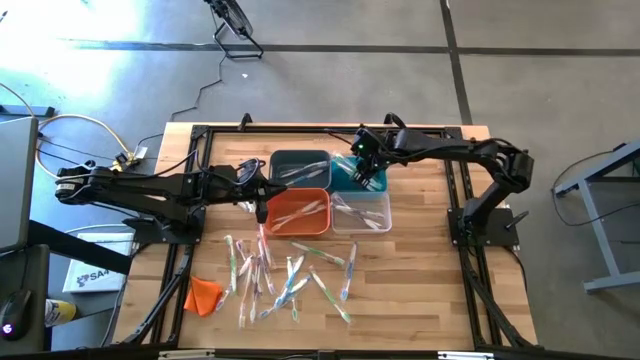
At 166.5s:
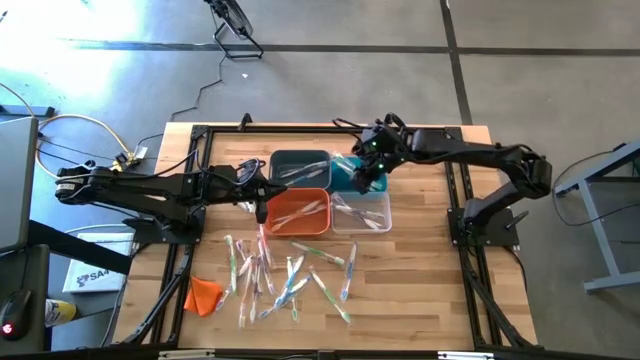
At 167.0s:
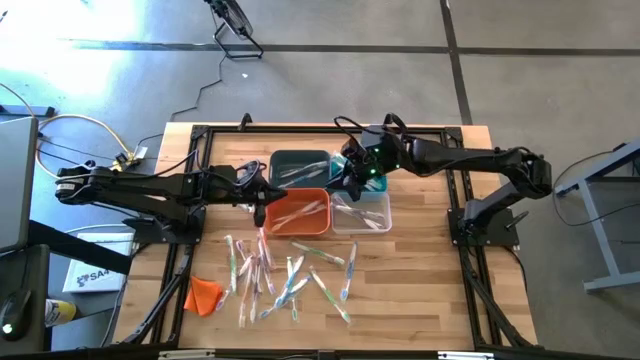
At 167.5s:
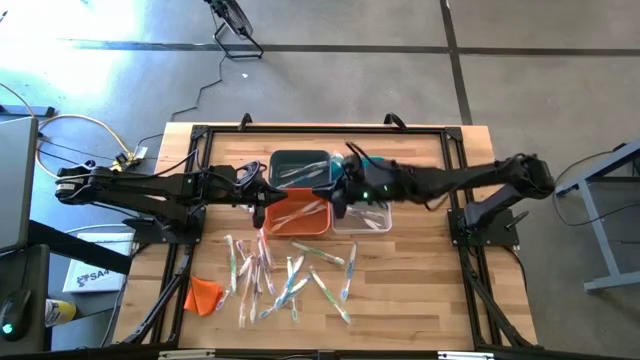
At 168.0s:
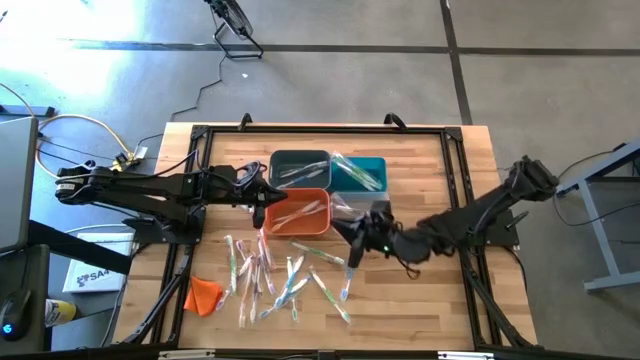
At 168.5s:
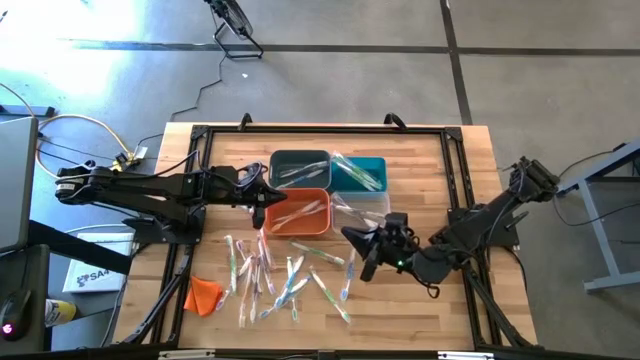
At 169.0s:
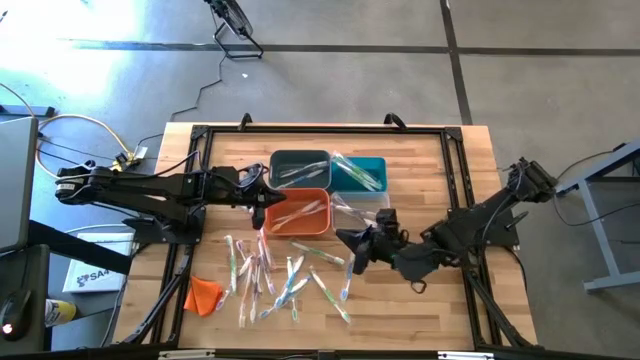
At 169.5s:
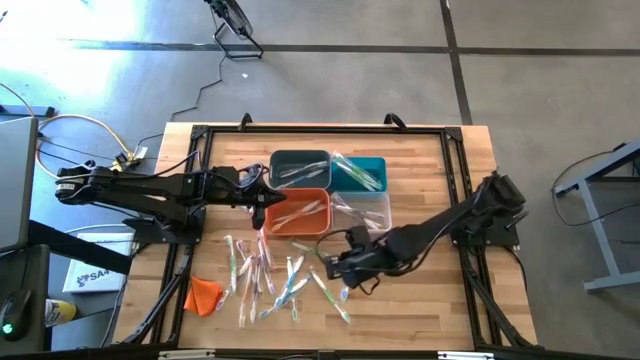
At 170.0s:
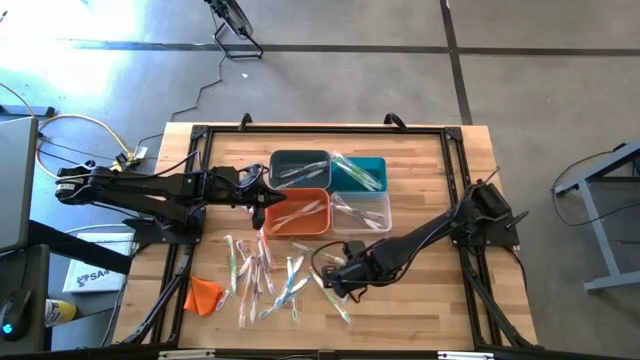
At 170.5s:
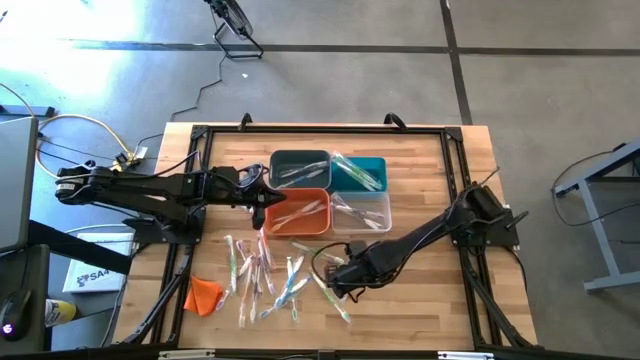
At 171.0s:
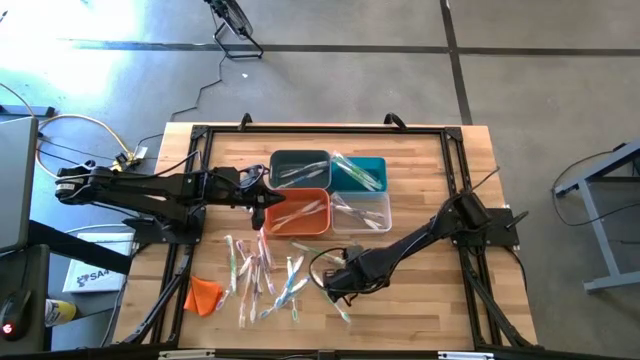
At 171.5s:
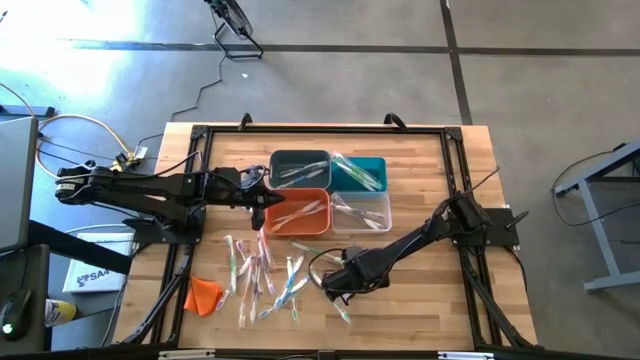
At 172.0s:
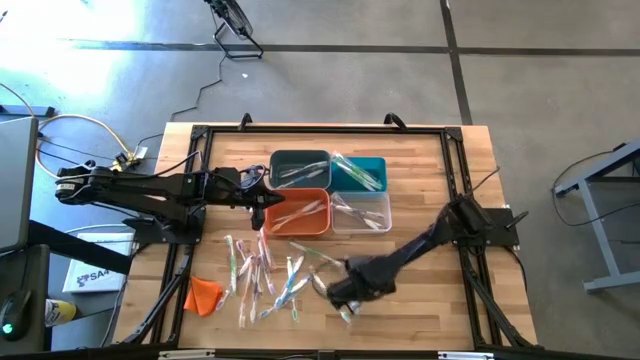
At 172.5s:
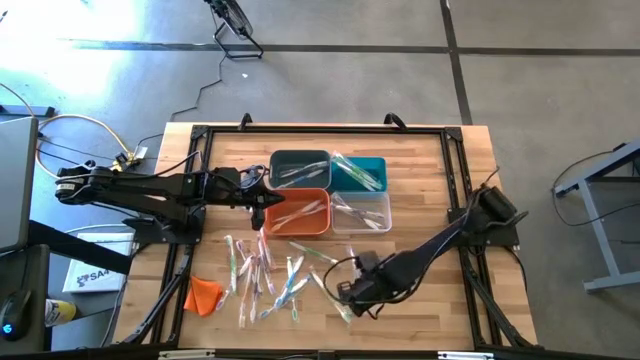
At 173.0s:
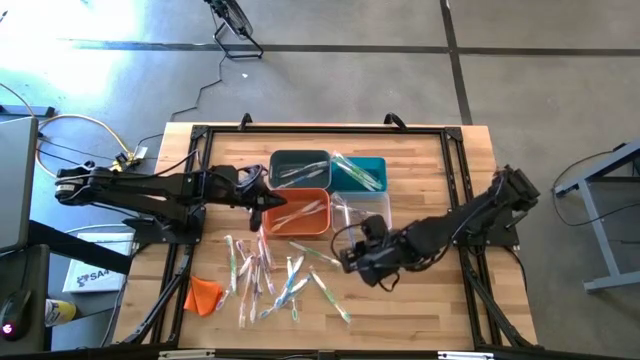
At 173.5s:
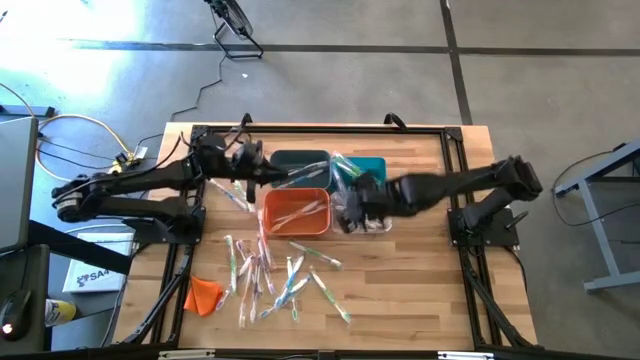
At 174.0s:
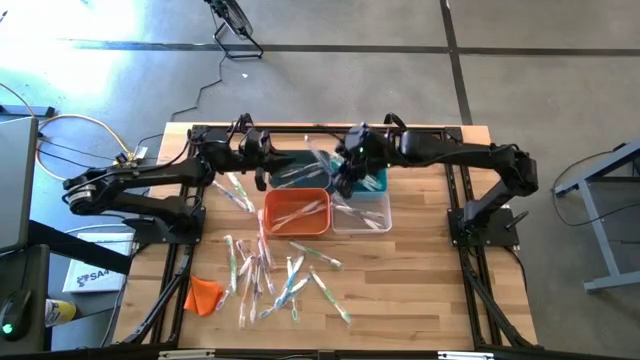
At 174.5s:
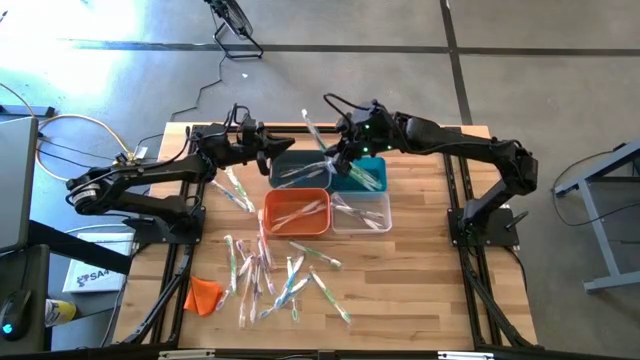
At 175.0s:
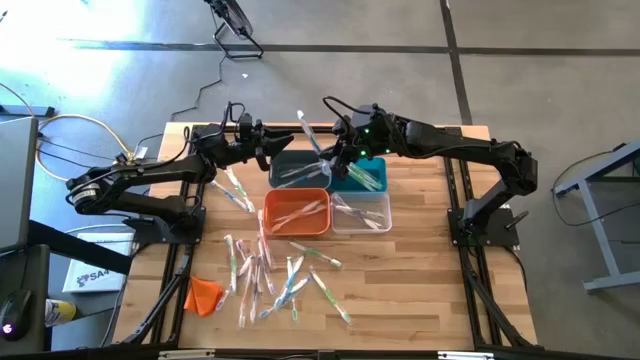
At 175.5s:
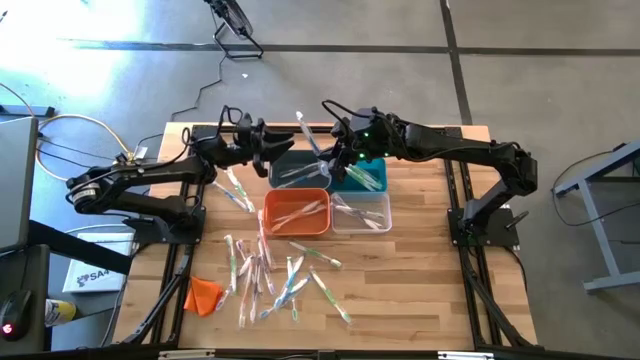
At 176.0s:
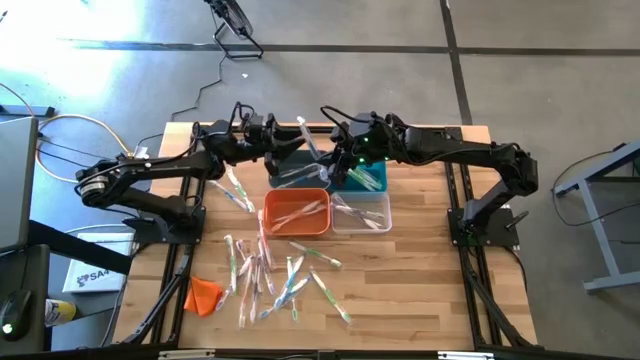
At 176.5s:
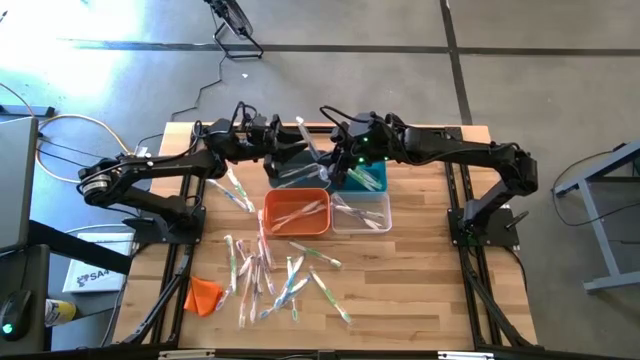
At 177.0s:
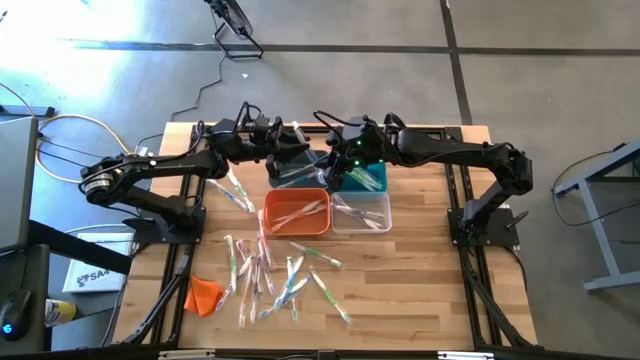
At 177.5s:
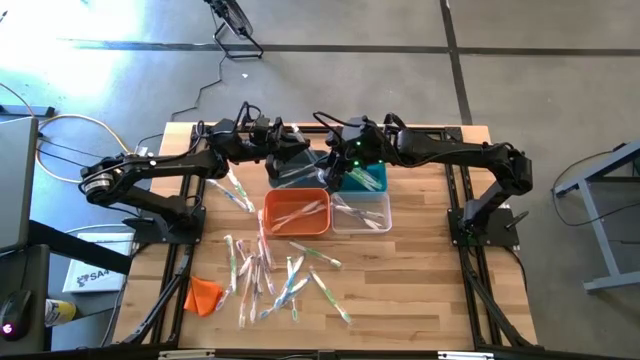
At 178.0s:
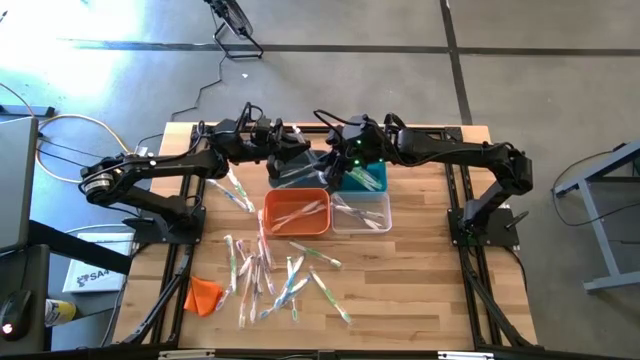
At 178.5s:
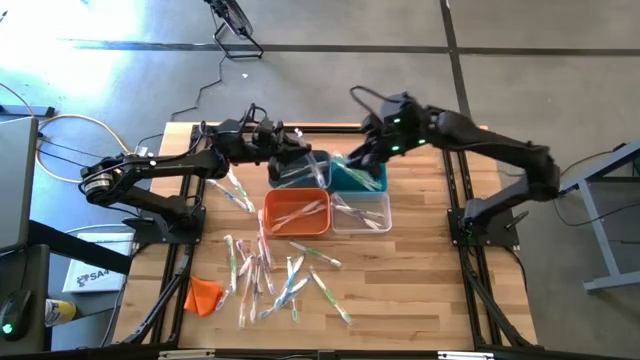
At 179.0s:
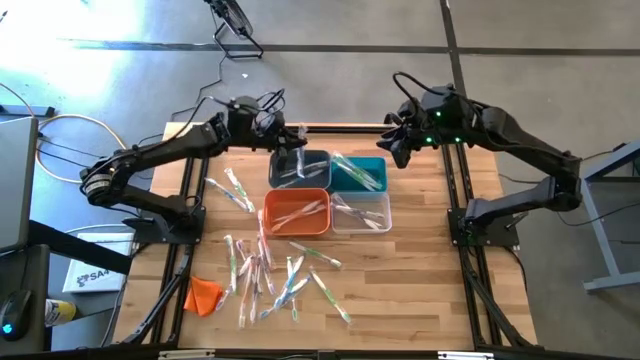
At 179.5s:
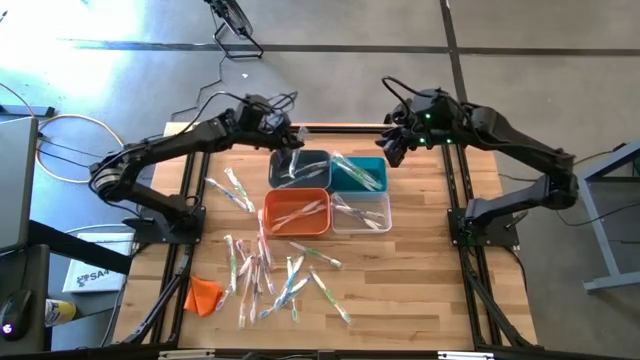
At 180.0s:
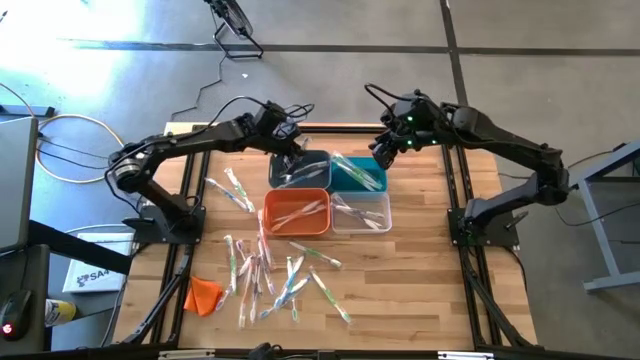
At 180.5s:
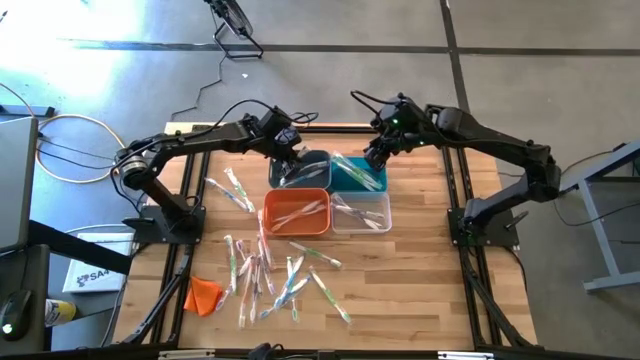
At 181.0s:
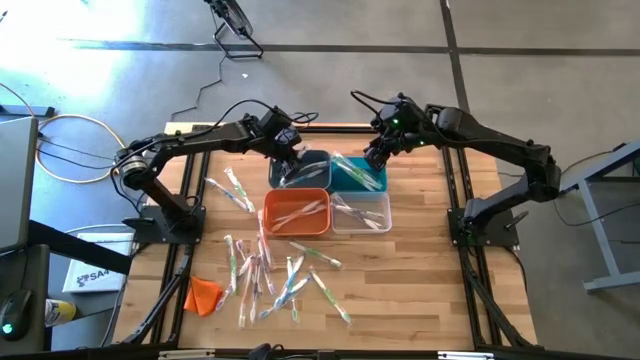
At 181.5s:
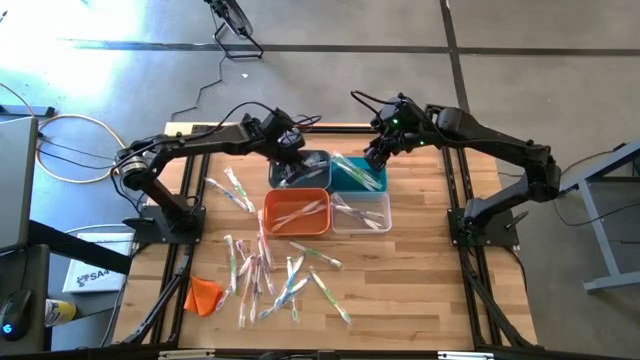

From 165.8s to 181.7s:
Task: Pick & Place Toothbrushes
Put the blue toothbrush into the left blue bin

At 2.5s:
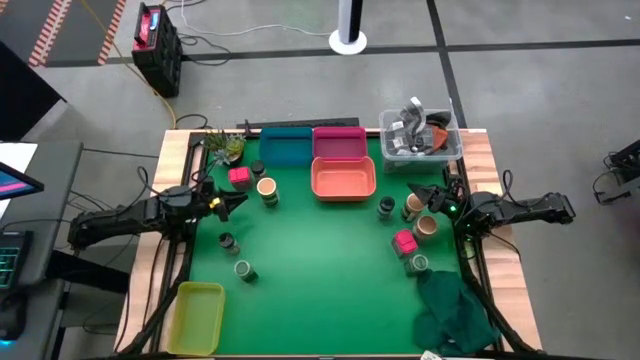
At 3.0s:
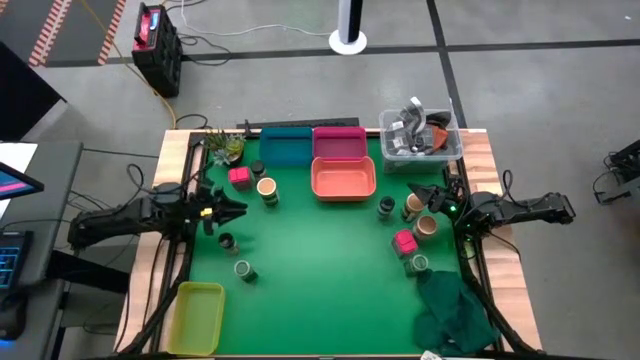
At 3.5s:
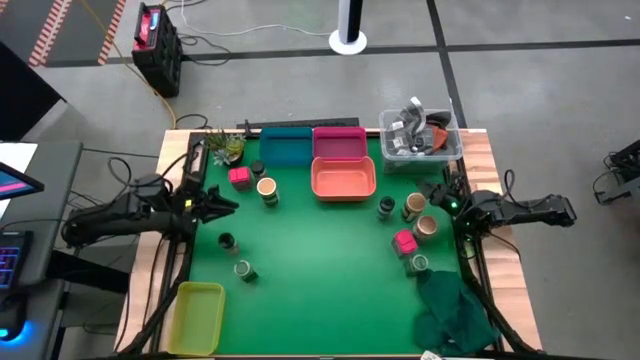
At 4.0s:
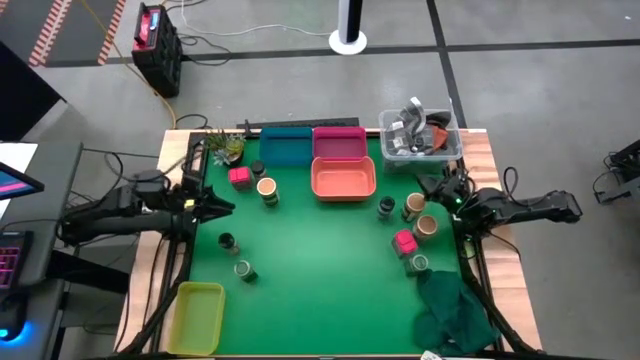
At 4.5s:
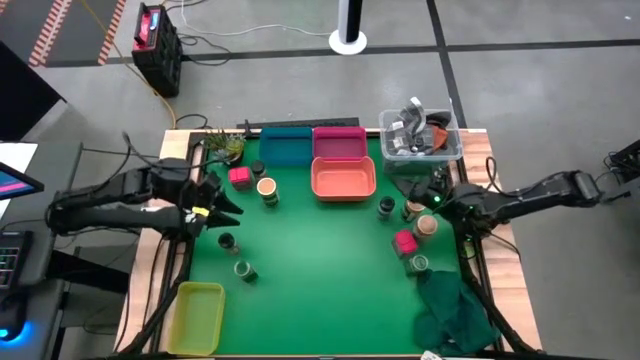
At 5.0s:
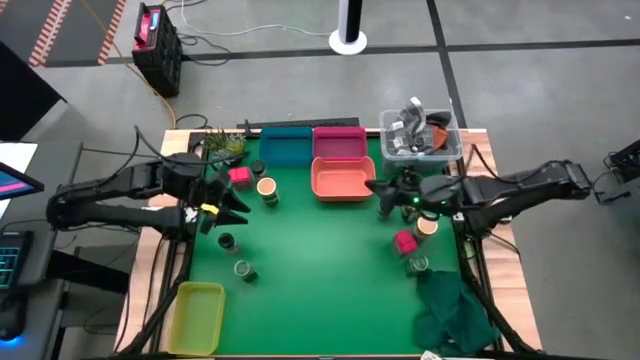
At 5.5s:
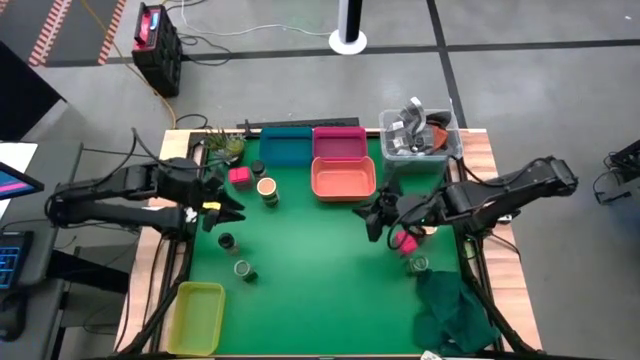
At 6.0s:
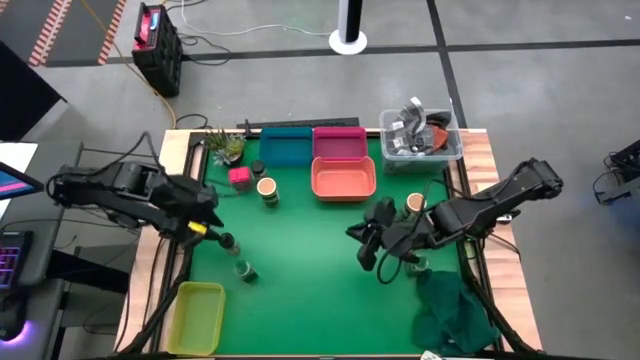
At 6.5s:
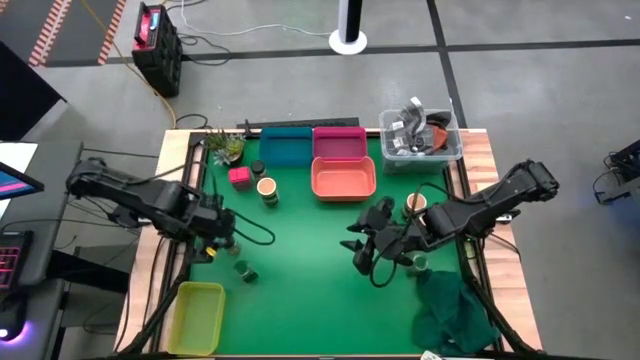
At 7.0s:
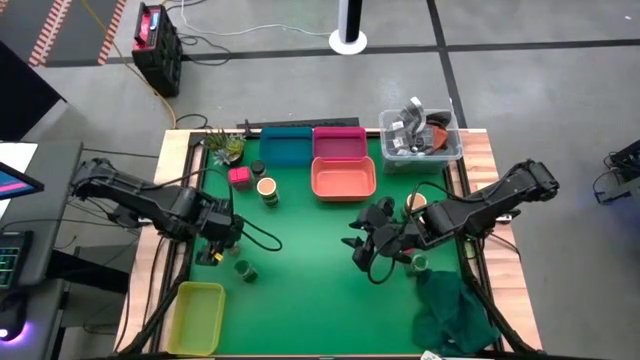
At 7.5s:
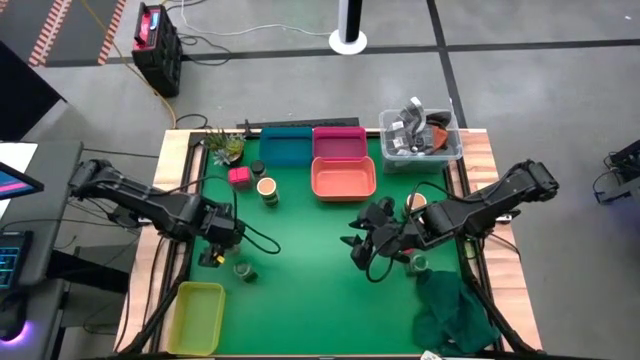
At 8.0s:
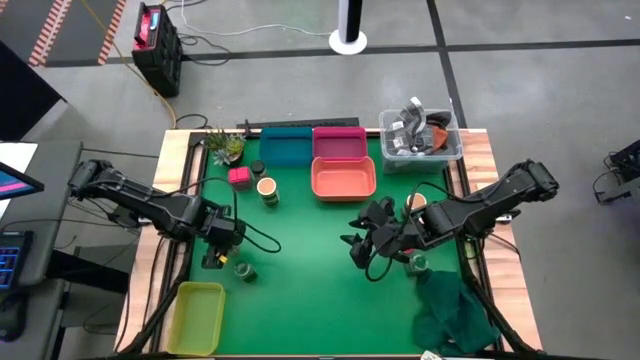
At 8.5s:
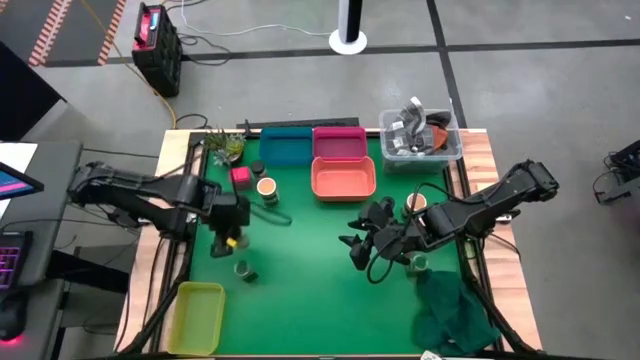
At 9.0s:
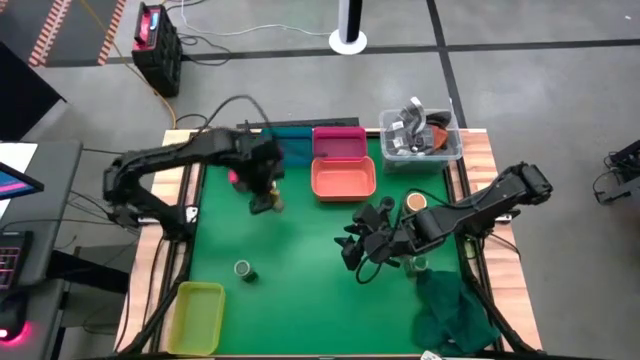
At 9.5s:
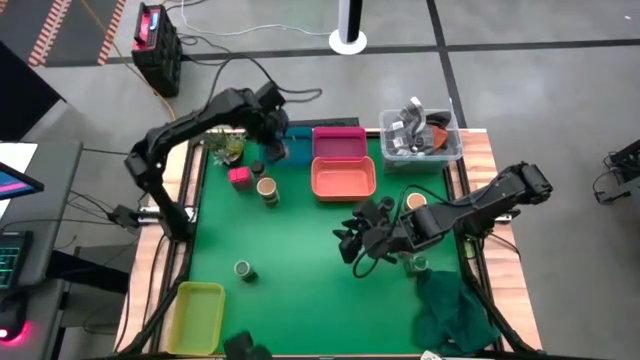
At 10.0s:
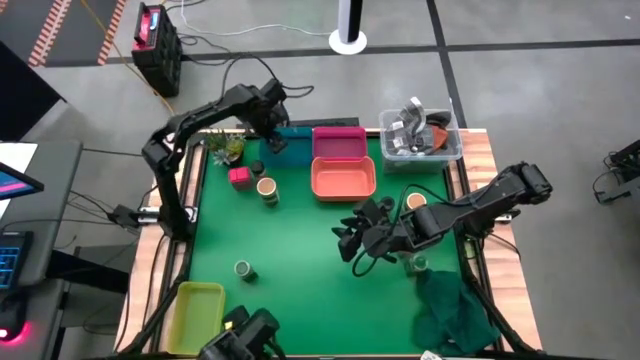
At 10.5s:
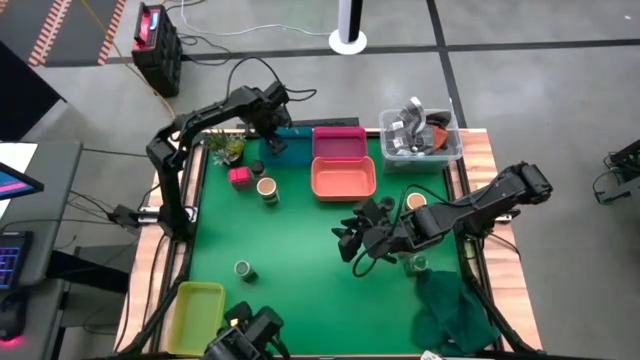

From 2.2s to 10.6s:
Task: Sort spices by type
Put the bottom black seasoning bottle into the blue bin
